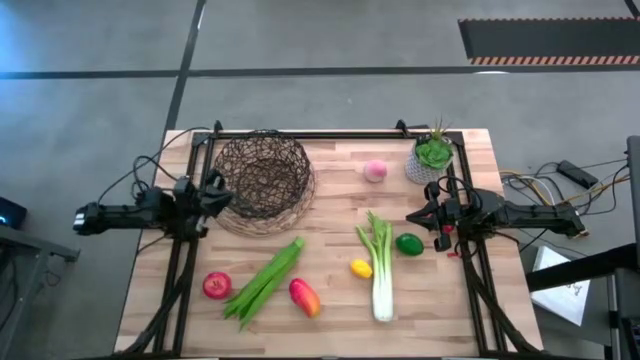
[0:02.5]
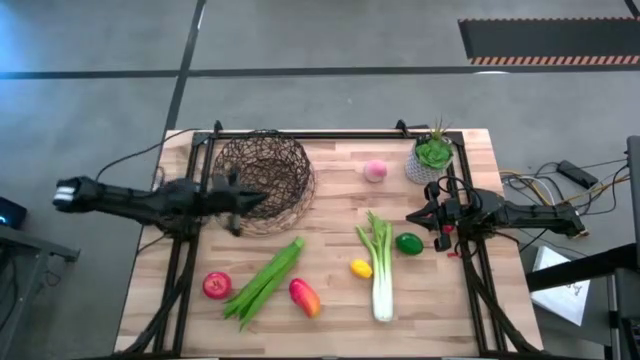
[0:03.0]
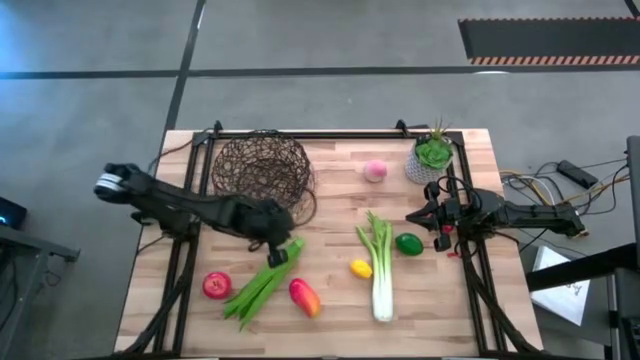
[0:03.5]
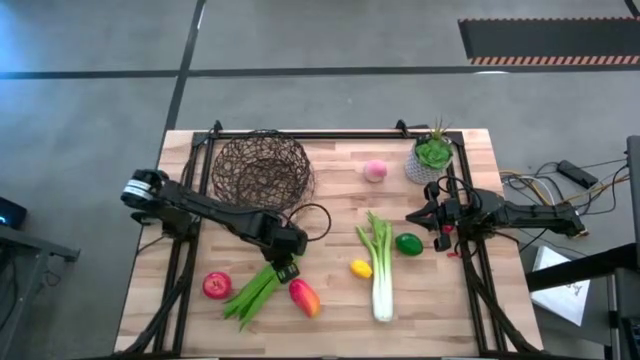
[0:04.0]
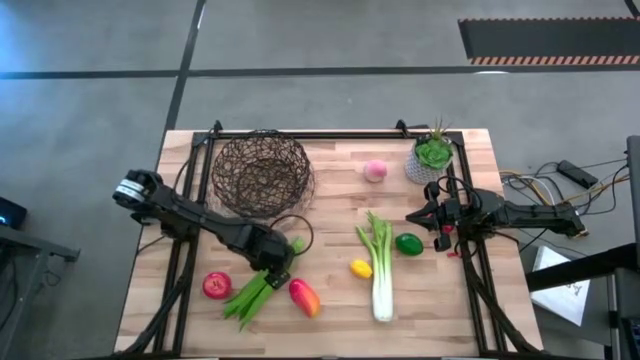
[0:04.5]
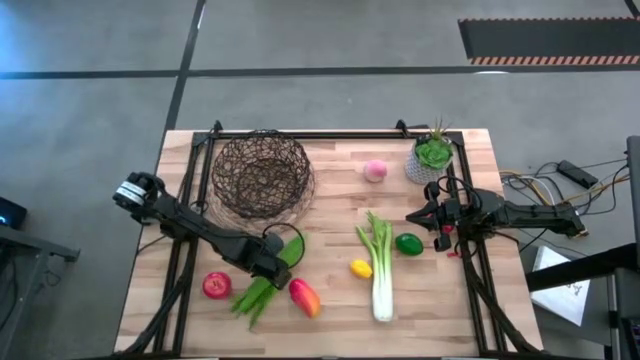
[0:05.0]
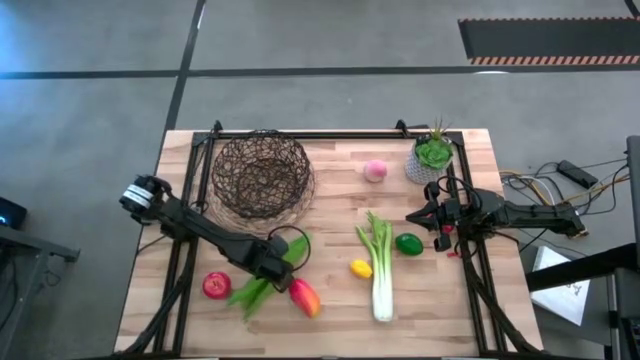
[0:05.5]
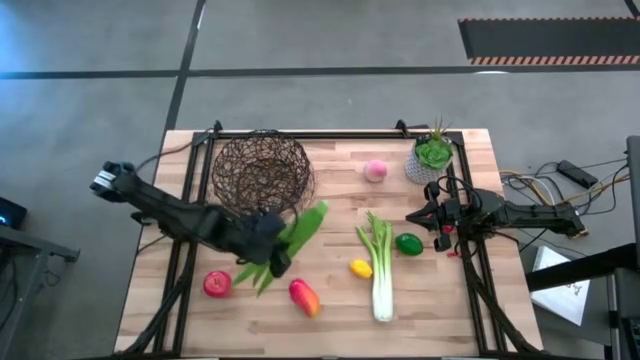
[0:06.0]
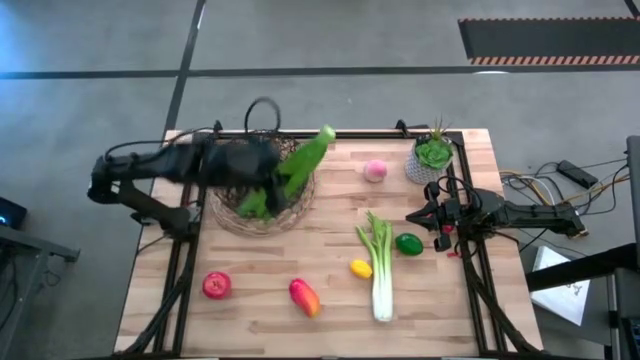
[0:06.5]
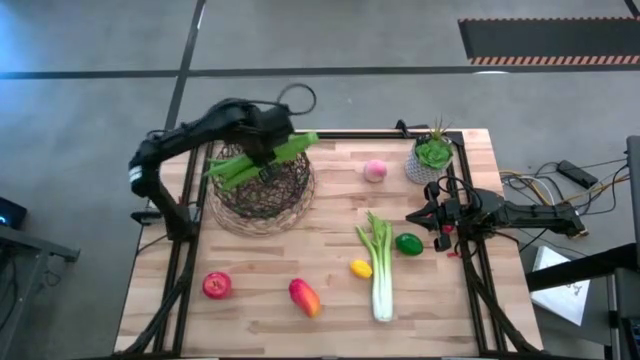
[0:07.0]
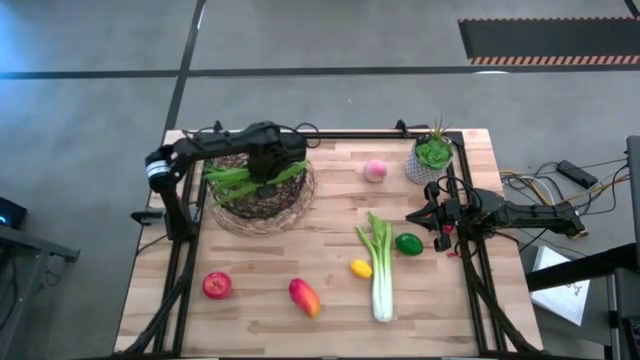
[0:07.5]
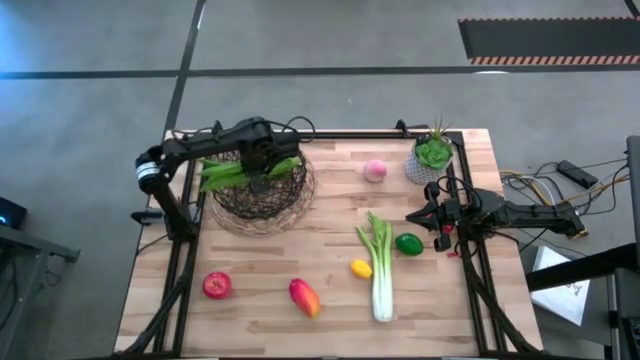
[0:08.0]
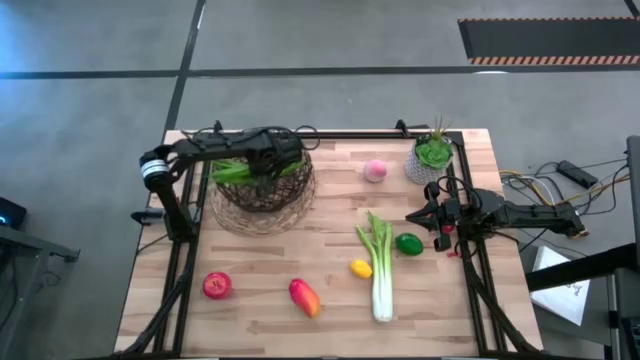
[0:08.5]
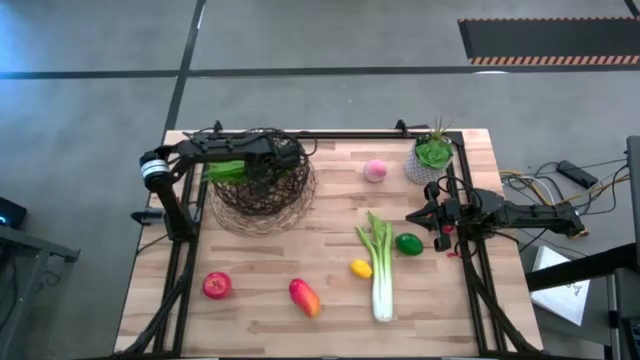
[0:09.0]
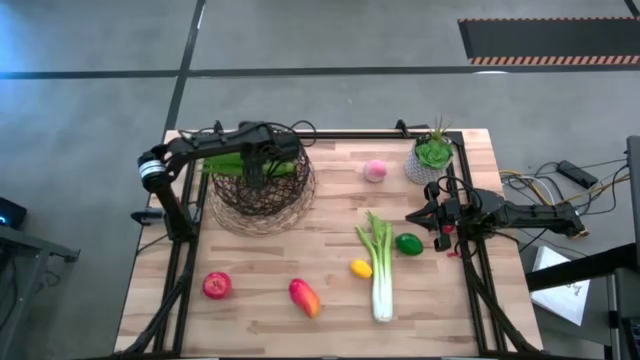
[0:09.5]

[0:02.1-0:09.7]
Task: Build produce basket
Put the green lettuce into the black mesh basket

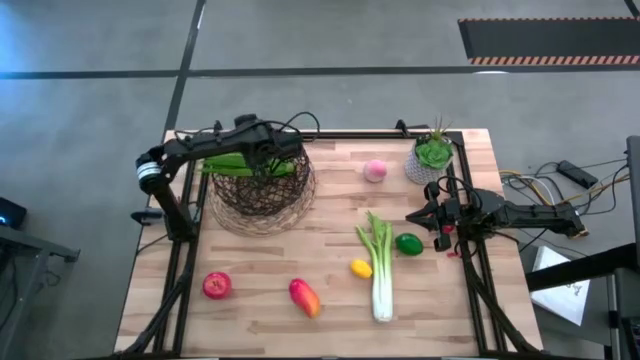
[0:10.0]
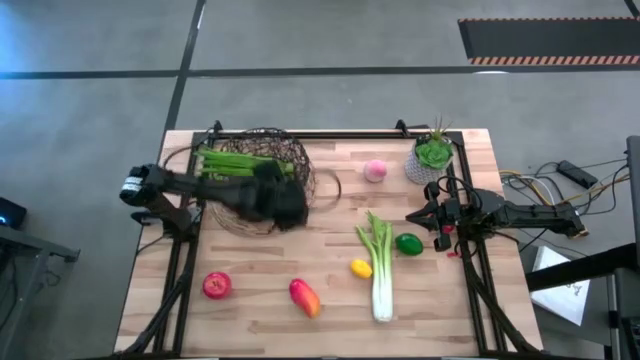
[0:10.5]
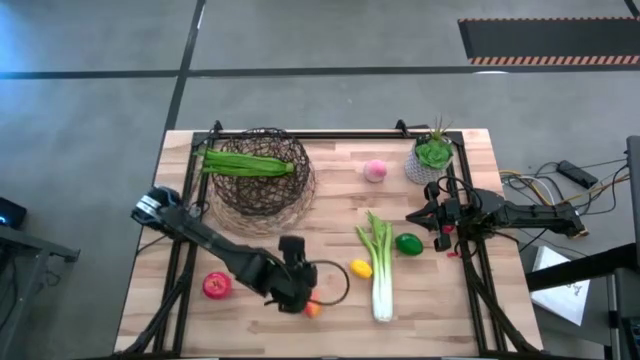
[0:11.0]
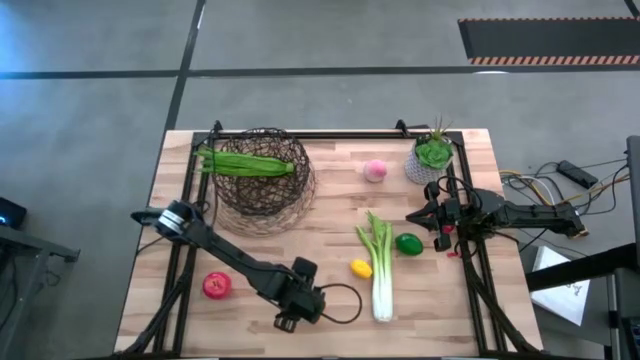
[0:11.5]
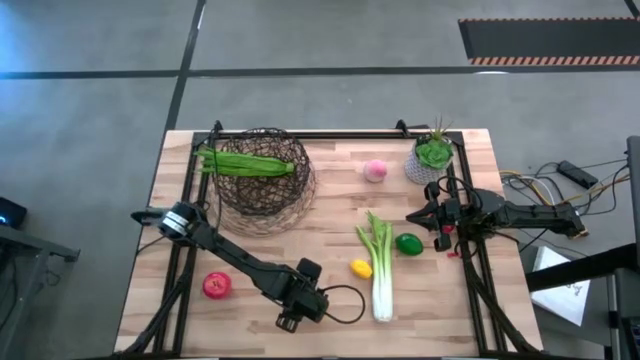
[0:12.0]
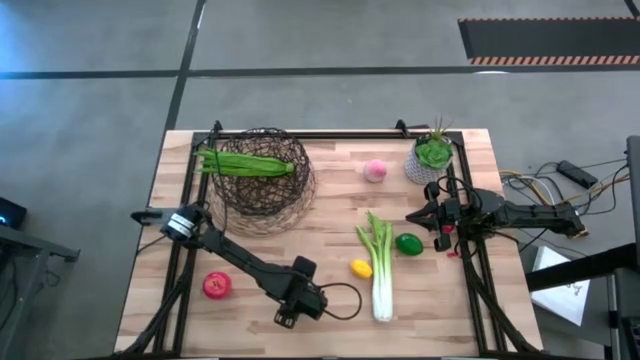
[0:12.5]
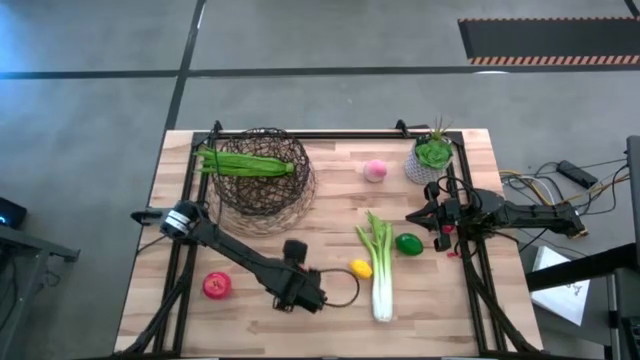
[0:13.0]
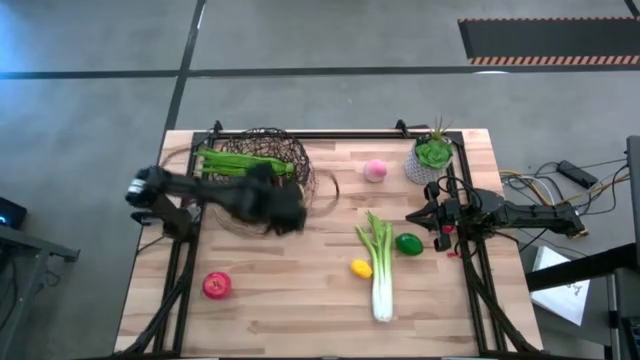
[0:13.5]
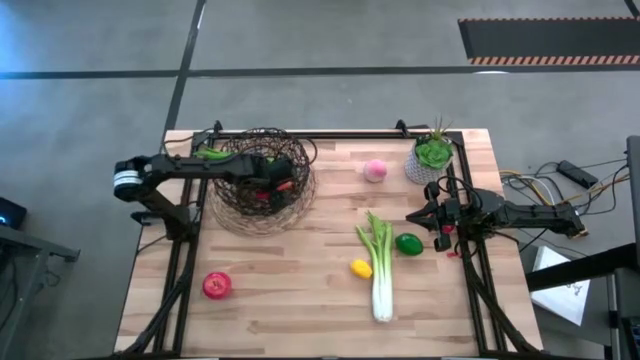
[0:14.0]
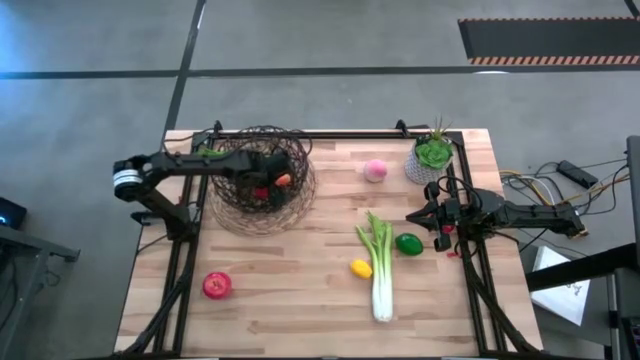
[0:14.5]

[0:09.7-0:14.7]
Put the bottom orange mango into the black mesh basket

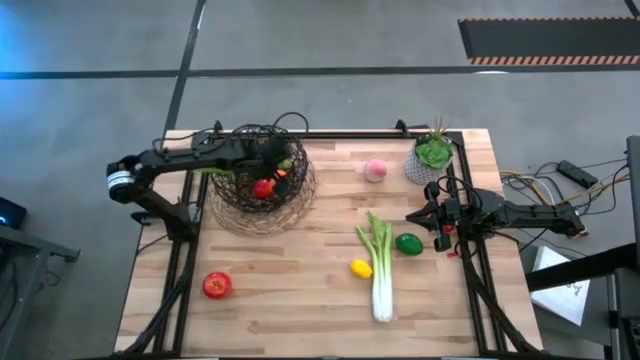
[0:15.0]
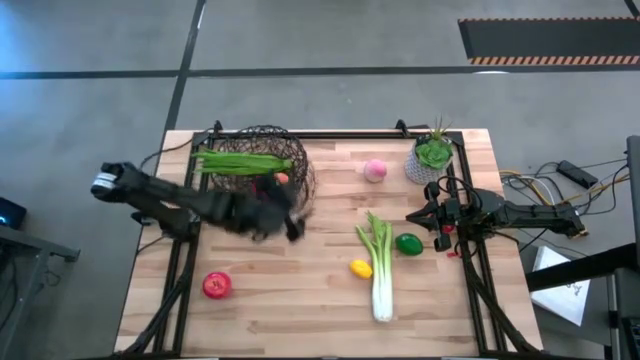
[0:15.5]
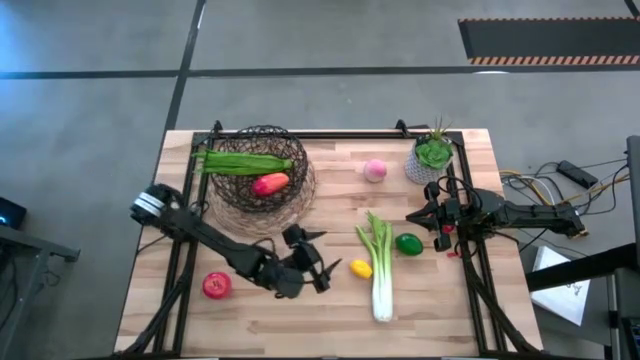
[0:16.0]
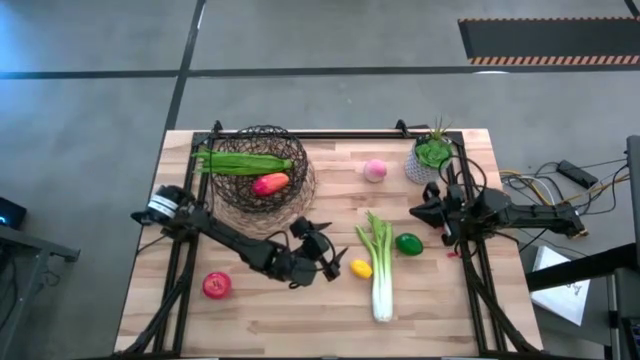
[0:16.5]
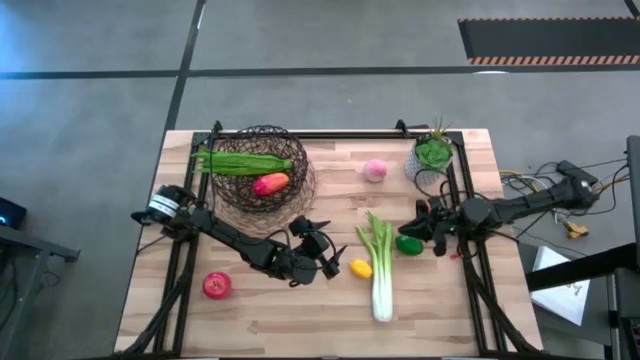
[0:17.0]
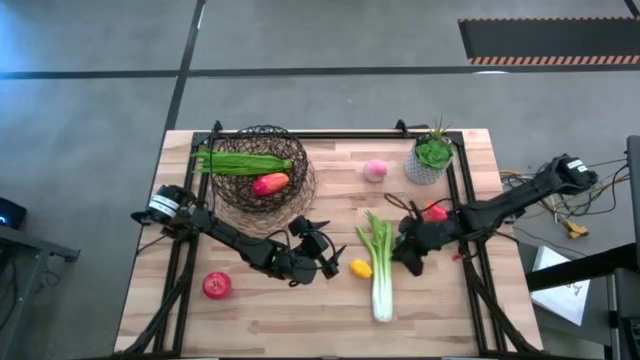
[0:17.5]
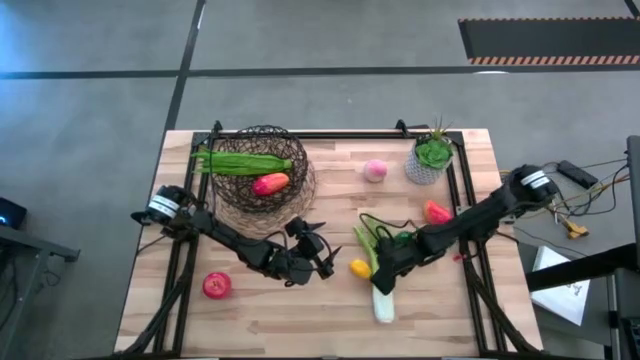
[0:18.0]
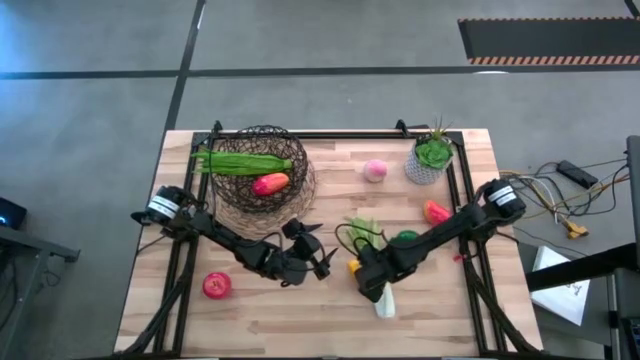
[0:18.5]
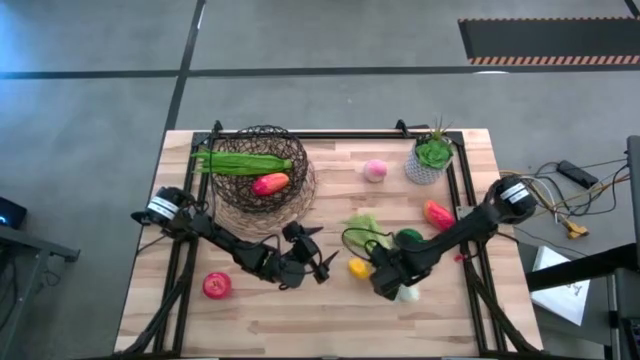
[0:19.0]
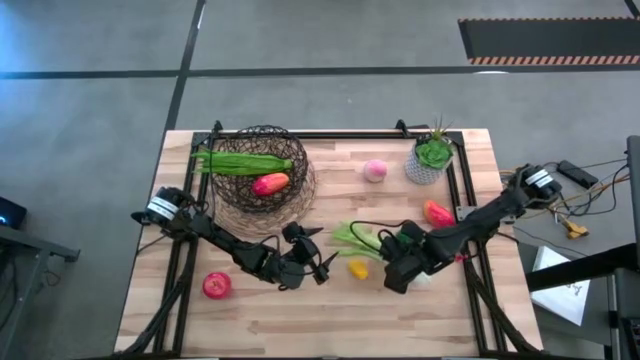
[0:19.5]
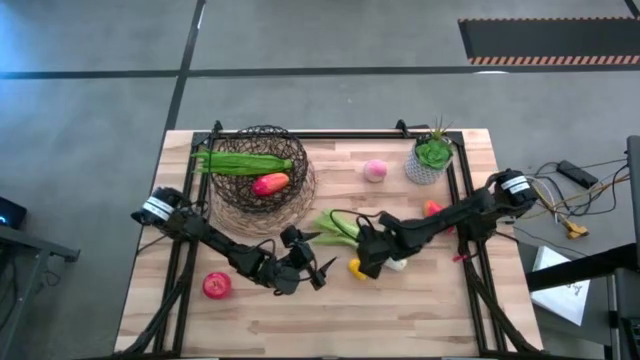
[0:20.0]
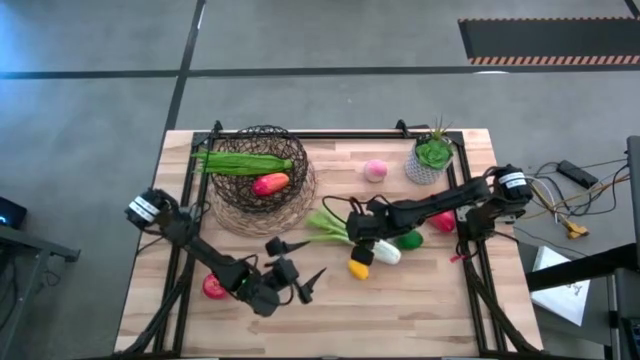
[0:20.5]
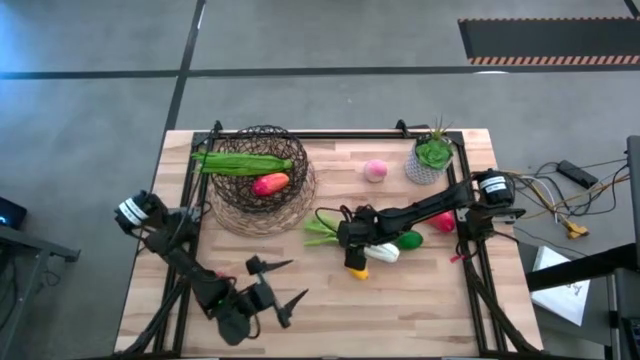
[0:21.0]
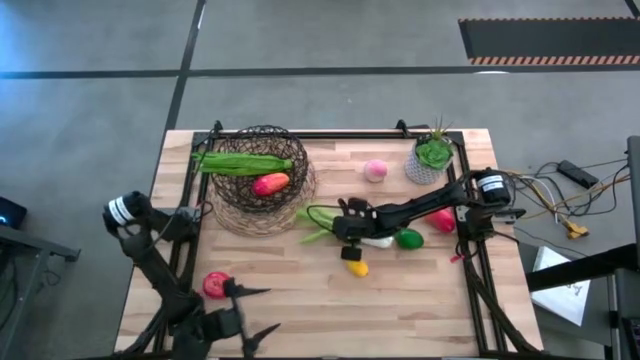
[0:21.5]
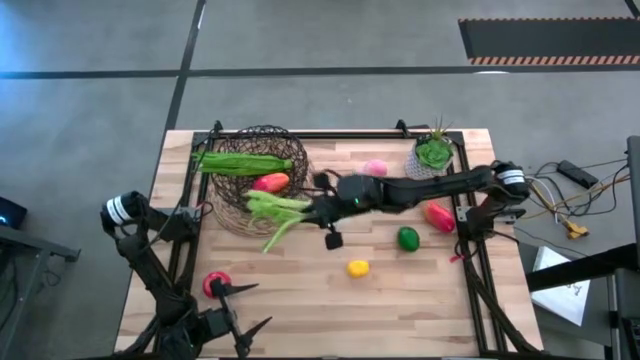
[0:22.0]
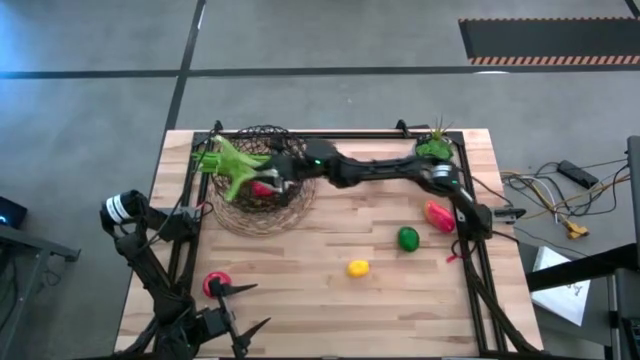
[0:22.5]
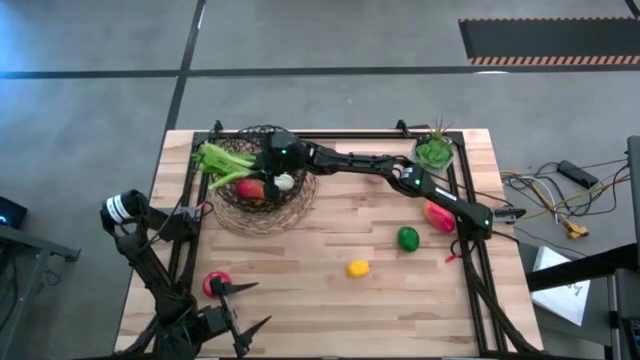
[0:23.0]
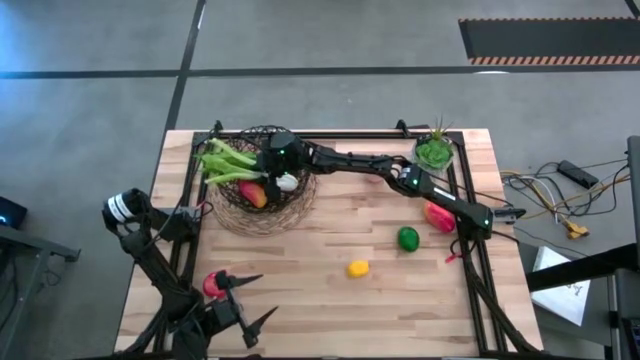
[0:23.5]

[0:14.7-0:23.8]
Put the green celery into the black mesh basket

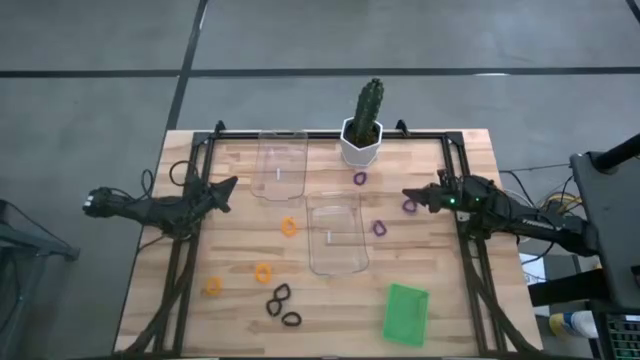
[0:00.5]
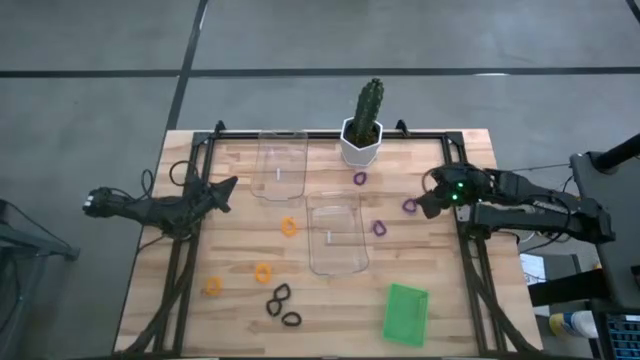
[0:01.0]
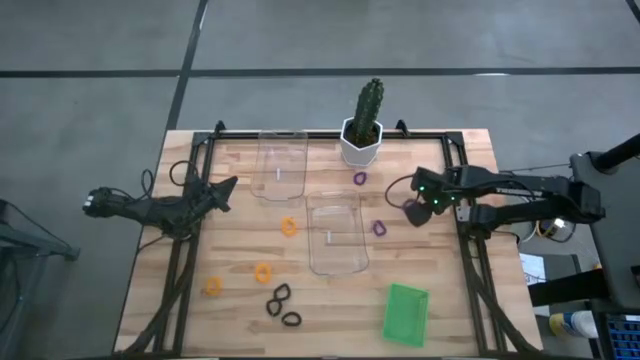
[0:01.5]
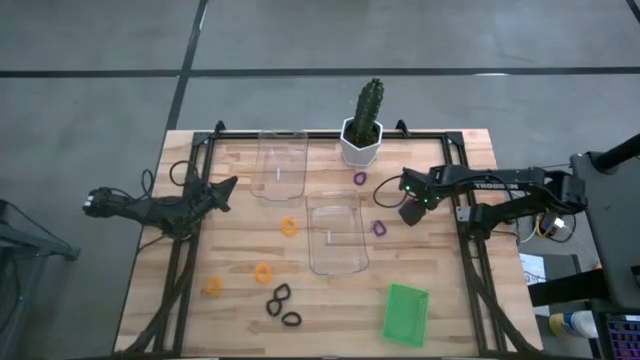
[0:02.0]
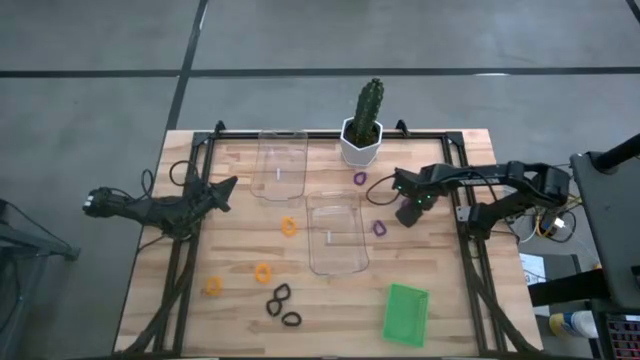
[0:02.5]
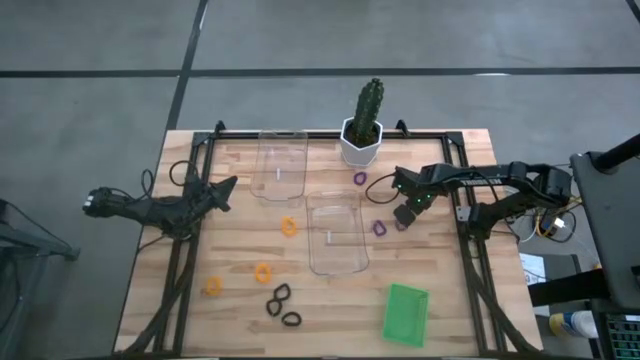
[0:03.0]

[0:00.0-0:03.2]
Task: Sort spring keychains
Put the right purple spring keychain into the green bin
